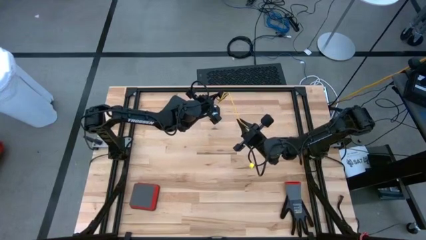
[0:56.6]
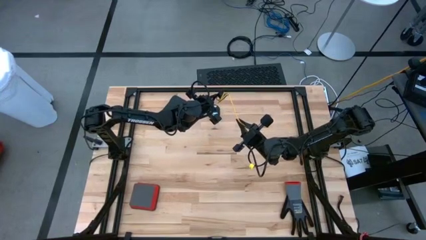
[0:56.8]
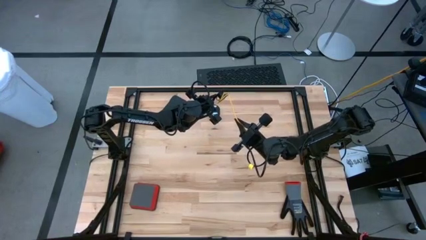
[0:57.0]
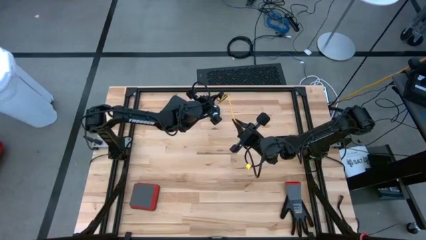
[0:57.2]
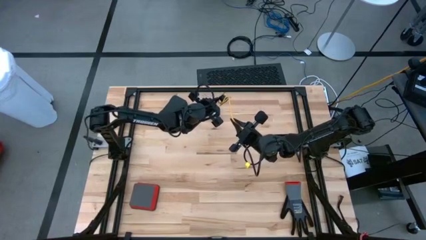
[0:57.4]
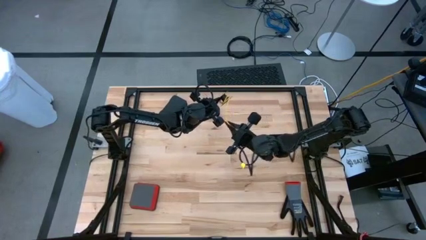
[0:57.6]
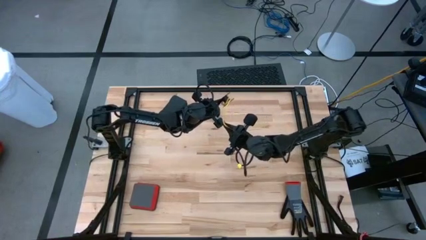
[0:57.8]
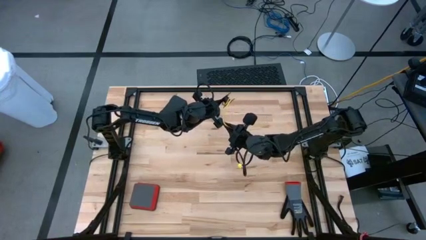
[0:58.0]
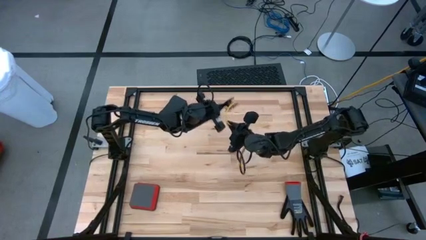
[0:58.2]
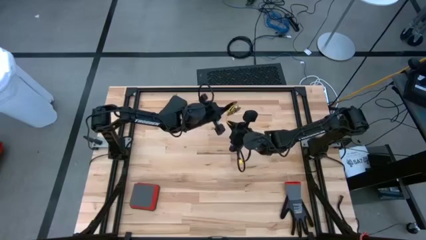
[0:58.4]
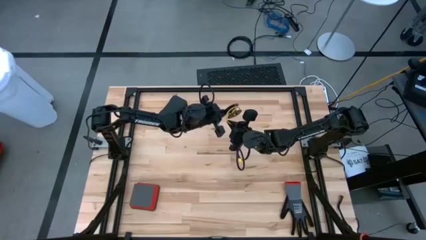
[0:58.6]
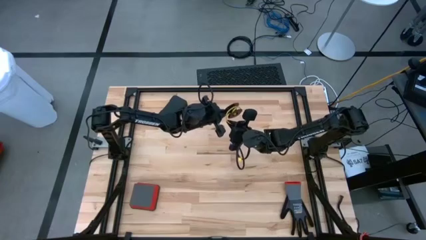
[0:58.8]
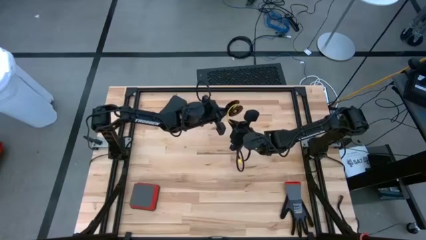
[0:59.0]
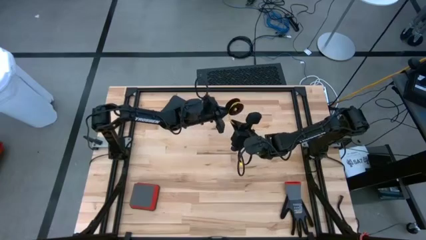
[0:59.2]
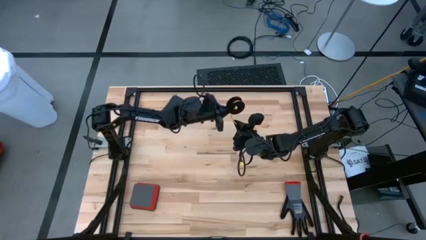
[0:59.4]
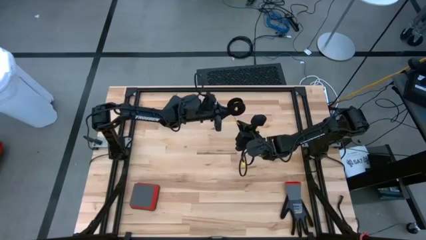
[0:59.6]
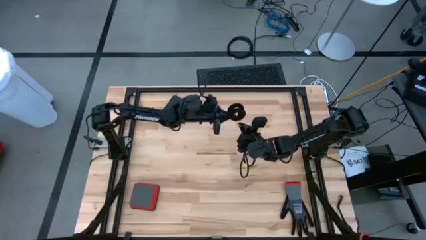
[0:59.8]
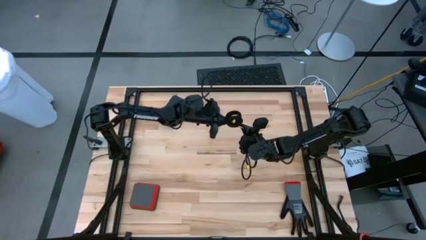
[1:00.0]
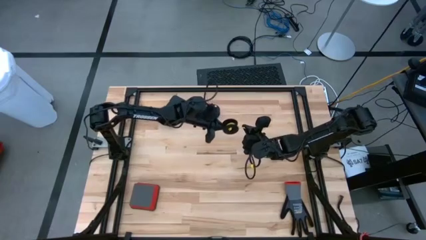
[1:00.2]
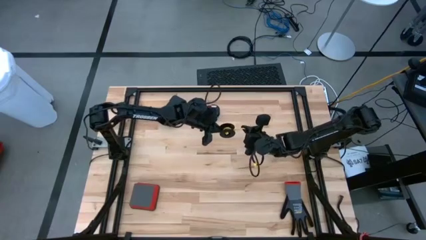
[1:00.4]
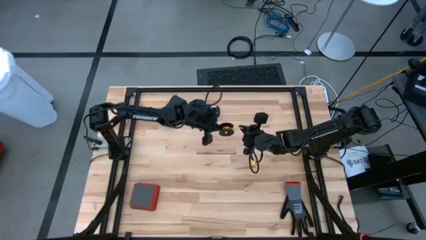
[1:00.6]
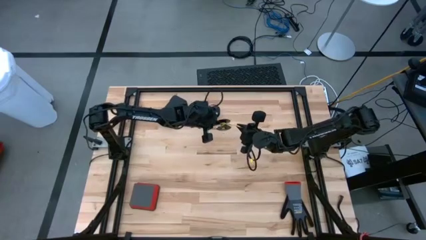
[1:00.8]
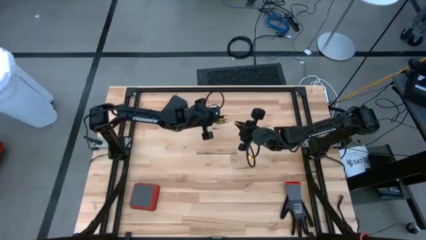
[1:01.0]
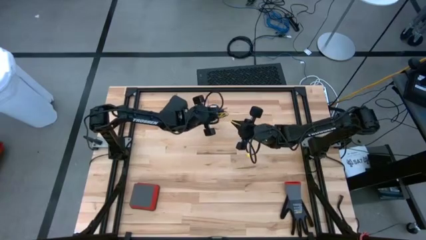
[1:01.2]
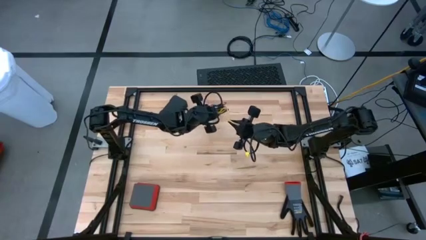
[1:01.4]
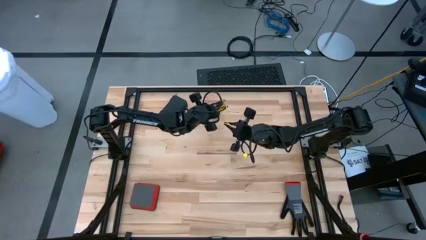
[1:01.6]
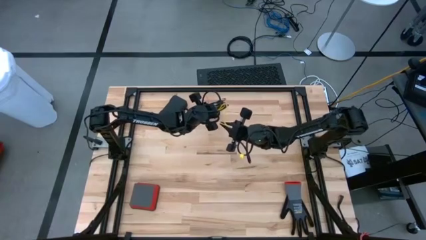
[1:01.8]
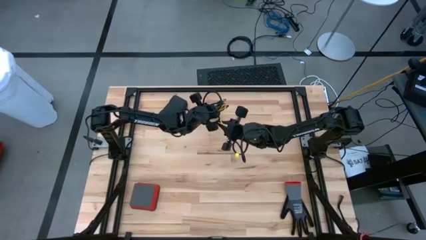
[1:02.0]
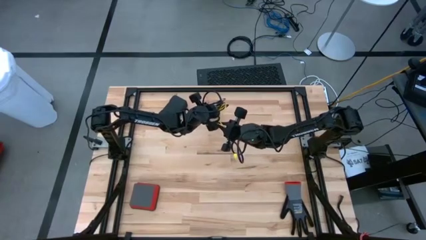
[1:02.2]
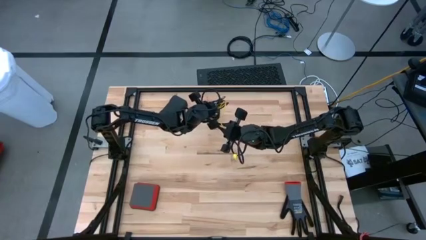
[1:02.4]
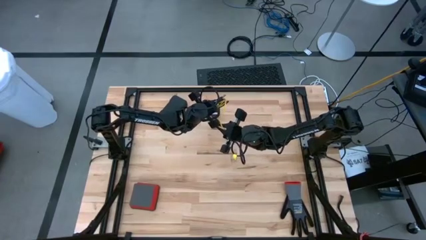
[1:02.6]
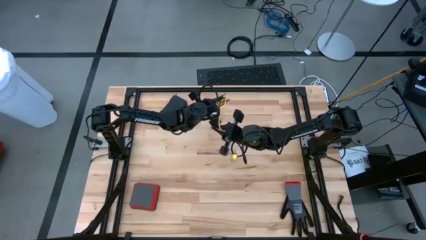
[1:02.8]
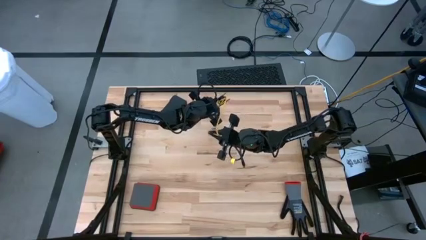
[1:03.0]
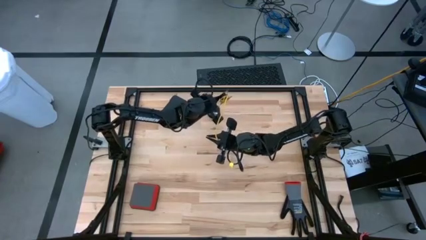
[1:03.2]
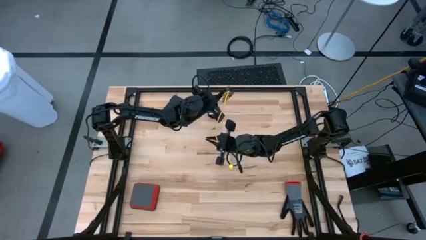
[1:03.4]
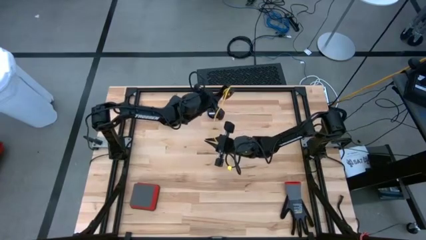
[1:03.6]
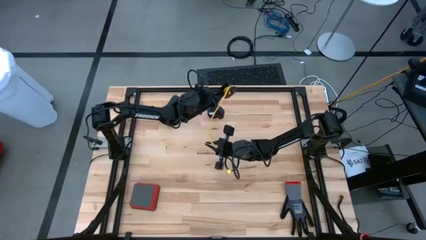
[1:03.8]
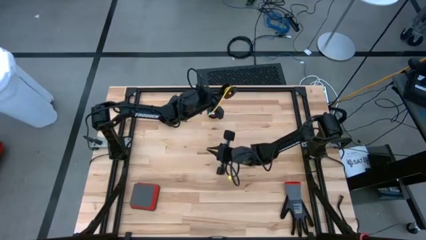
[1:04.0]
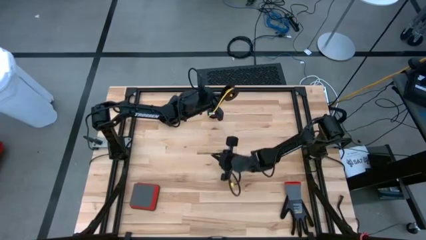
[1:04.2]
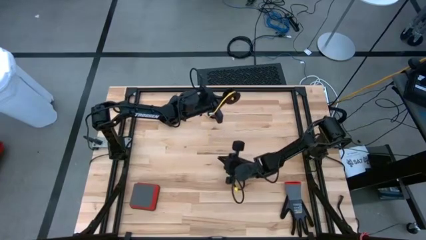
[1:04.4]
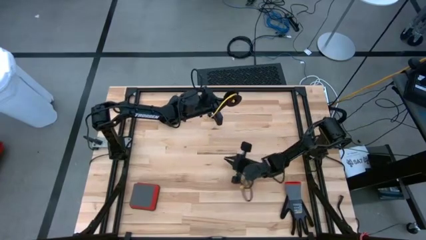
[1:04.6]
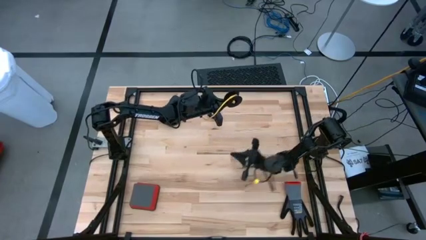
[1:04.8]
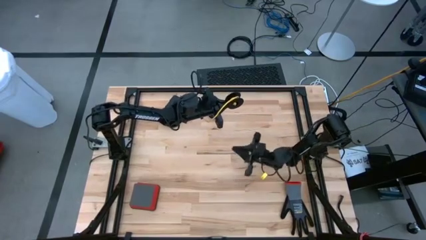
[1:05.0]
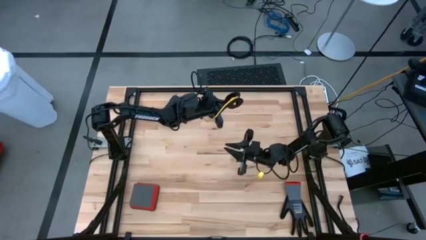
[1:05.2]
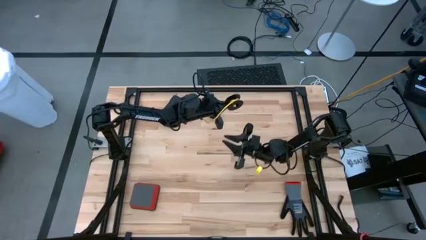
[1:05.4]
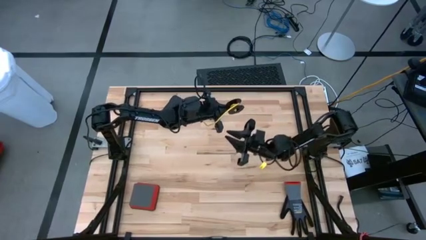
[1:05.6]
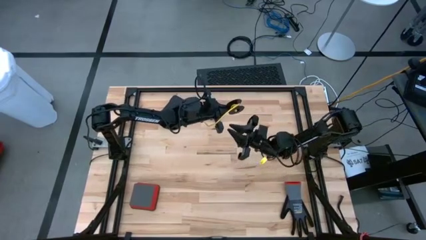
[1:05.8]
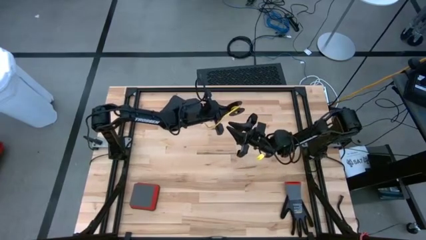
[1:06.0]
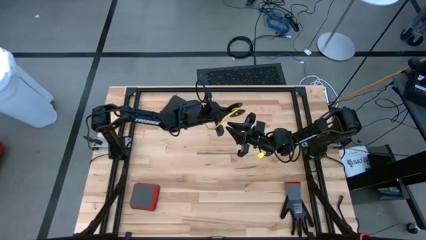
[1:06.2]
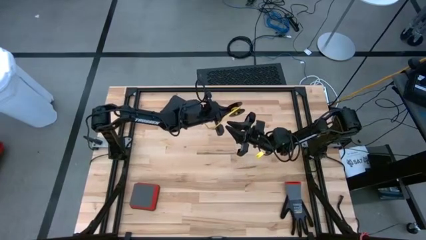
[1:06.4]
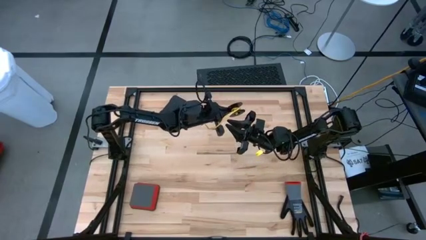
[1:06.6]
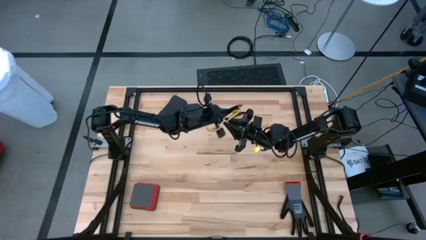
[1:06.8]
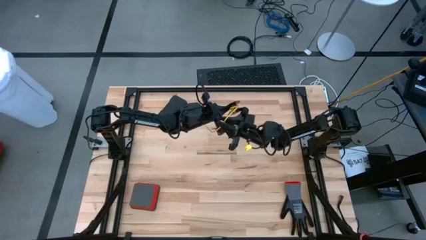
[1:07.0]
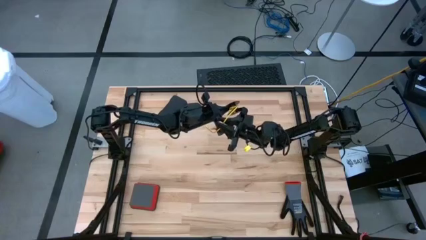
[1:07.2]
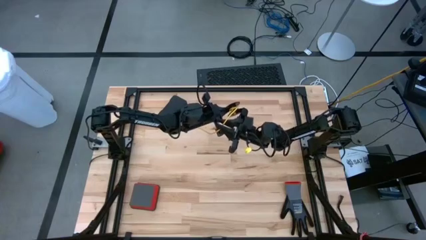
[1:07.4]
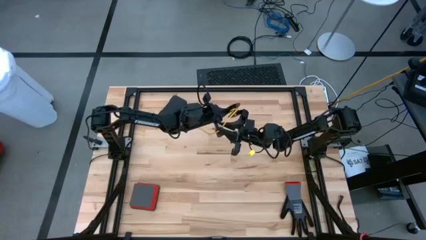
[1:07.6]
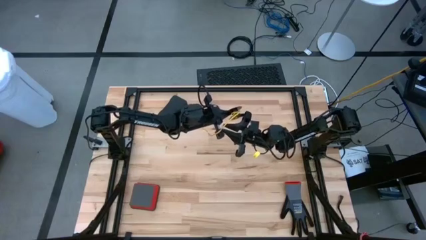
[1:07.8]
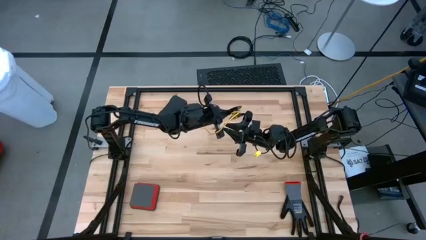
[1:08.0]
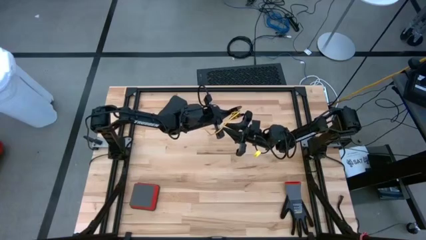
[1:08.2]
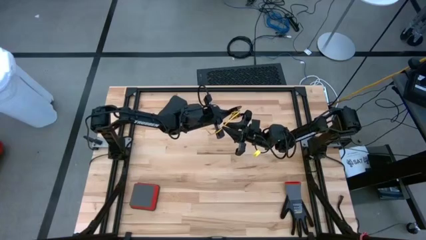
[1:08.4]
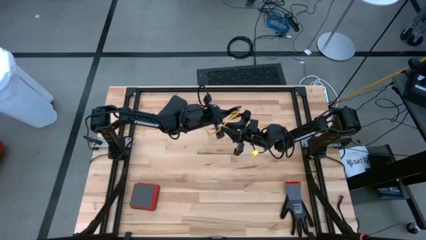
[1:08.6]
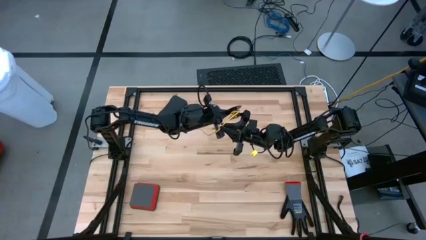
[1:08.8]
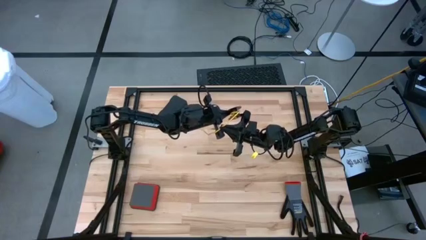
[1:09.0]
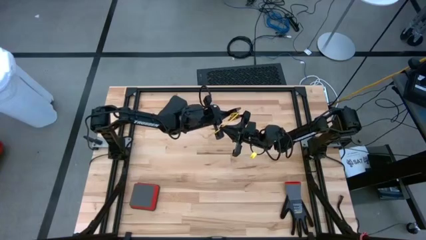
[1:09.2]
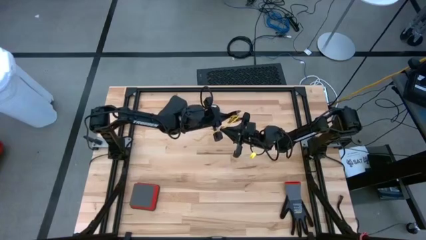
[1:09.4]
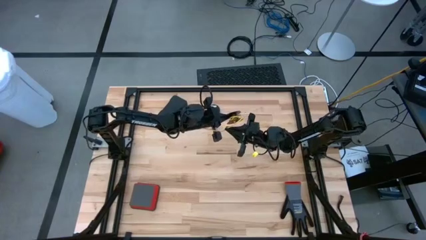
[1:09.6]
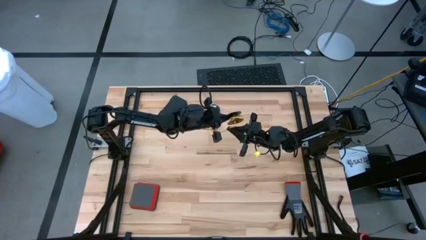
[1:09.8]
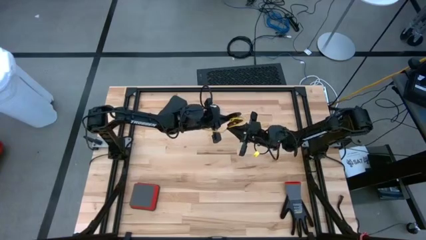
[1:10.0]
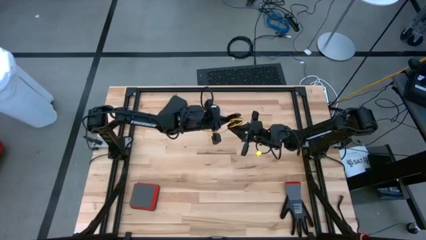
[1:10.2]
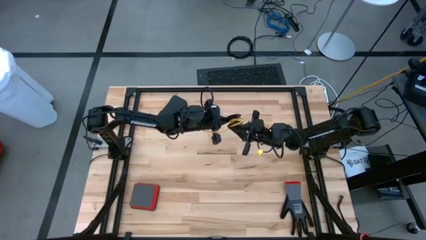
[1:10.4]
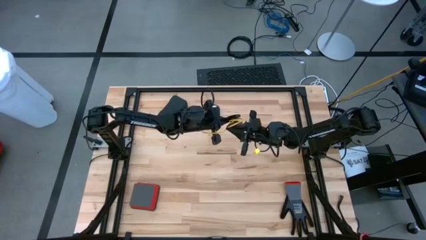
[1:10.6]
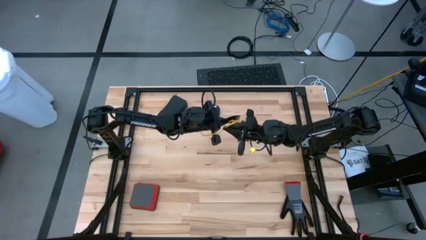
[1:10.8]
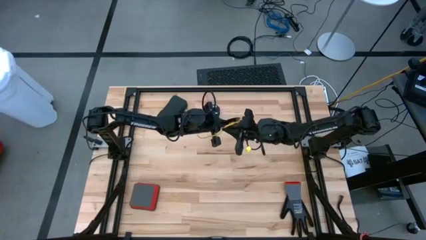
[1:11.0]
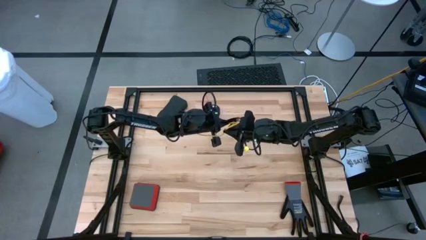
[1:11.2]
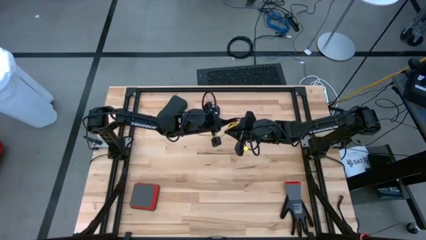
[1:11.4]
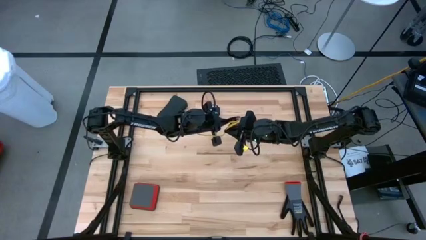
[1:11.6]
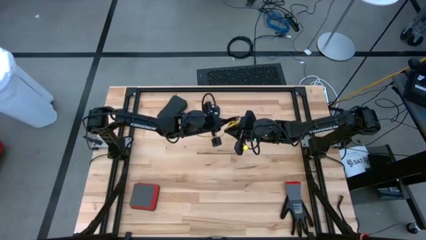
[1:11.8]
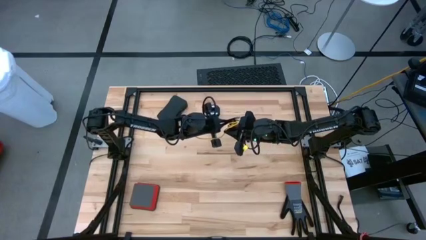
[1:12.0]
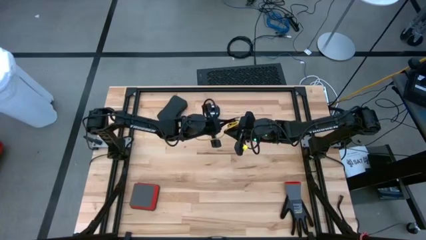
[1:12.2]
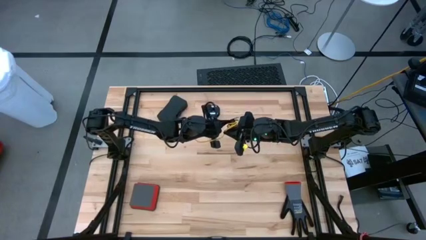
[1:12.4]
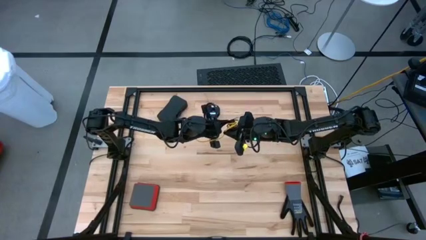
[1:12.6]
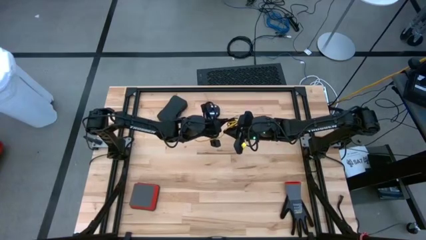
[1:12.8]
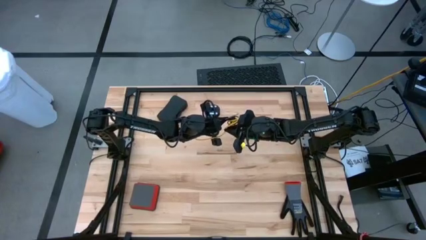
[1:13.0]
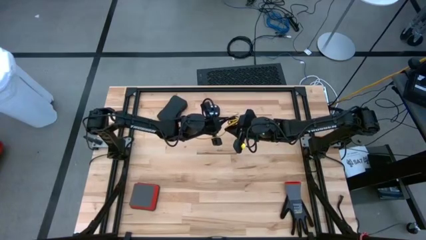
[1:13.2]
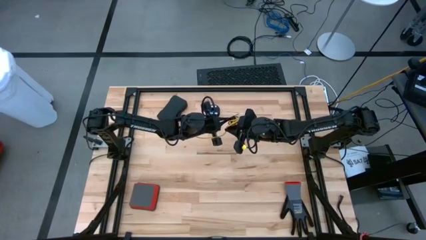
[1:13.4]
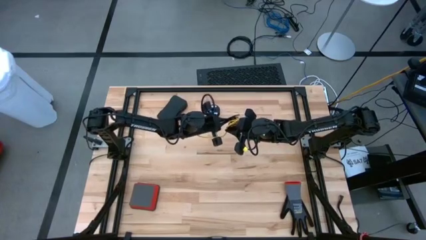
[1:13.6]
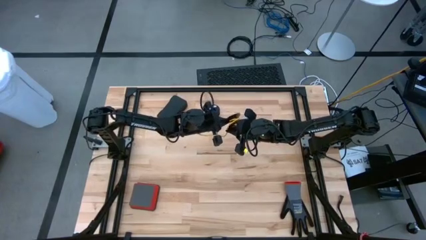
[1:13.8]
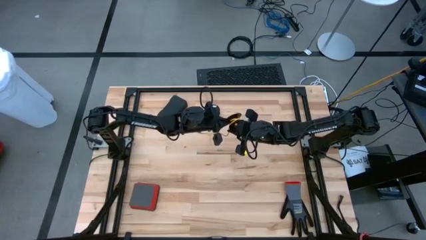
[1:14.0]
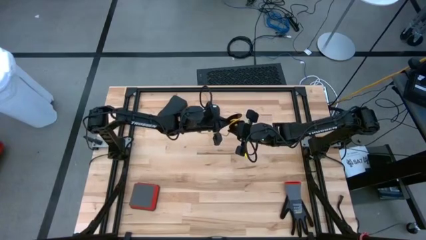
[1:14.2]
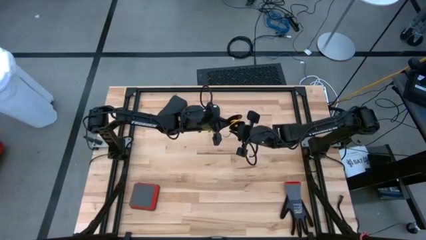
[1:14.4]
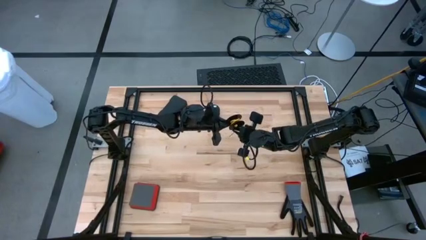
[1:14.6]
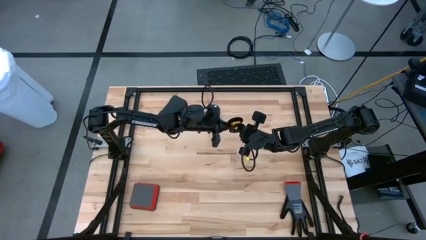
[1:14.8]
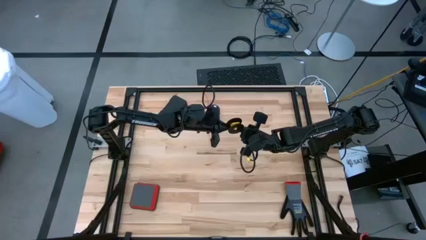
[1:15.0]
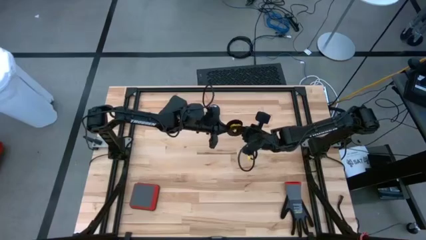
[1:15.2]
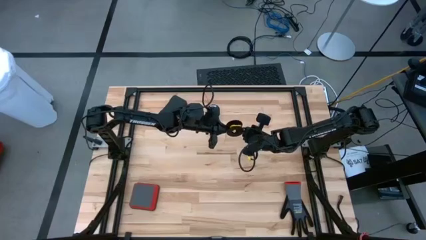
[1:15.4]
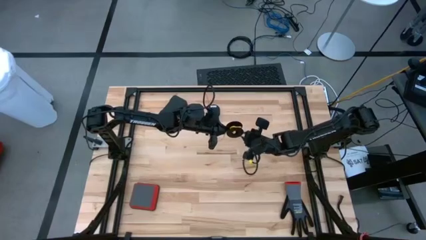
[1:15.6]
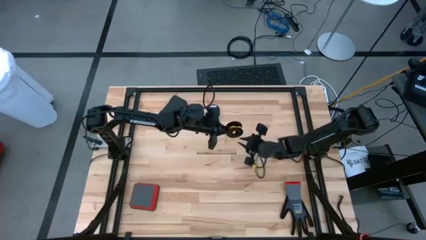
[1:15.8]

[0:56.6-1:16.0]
Task: Coil cords
Coil the yellow wire onto the black spool
